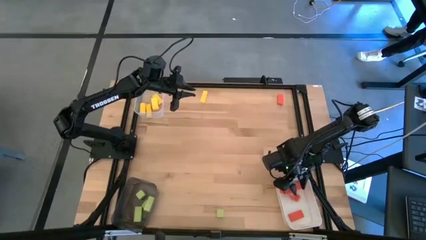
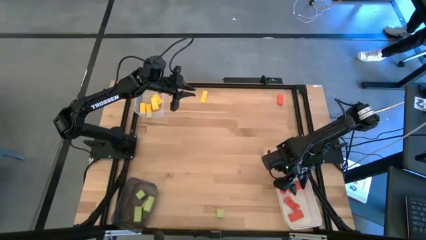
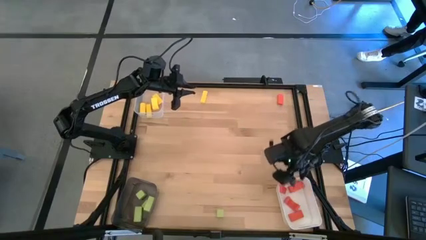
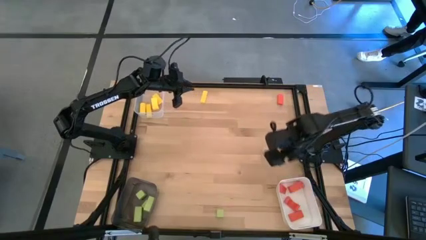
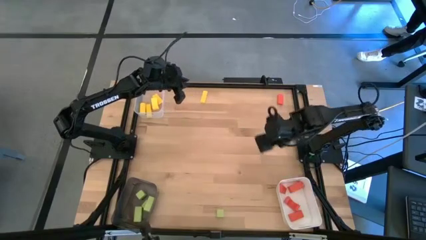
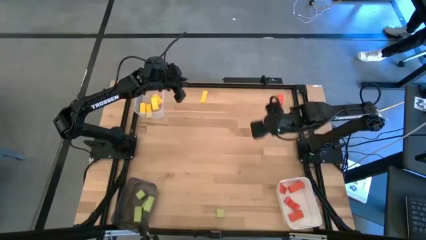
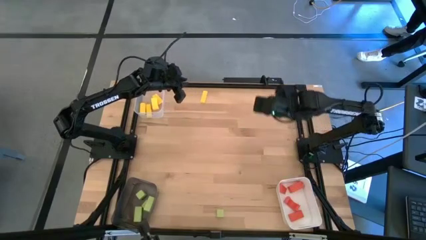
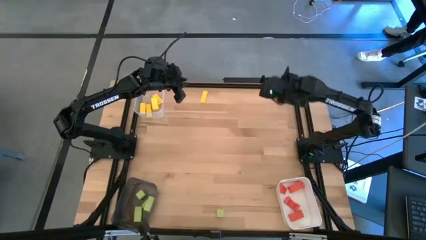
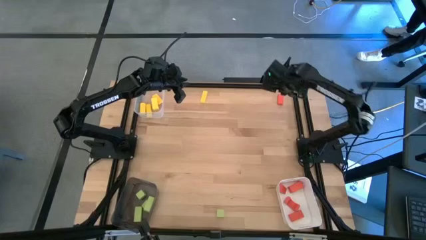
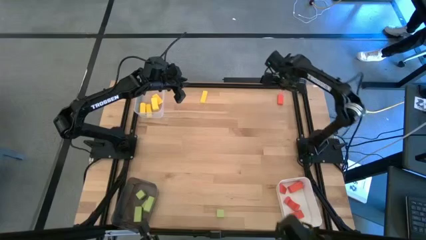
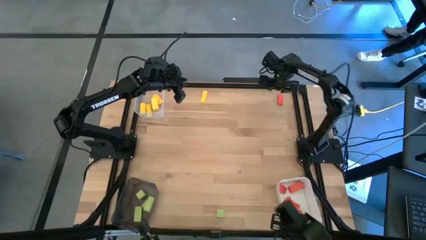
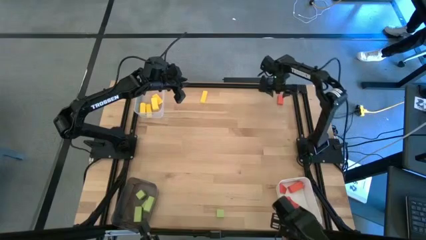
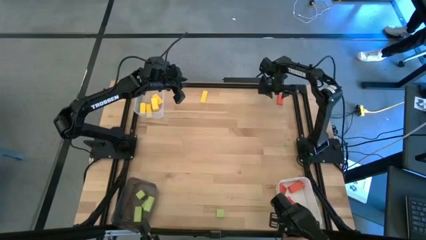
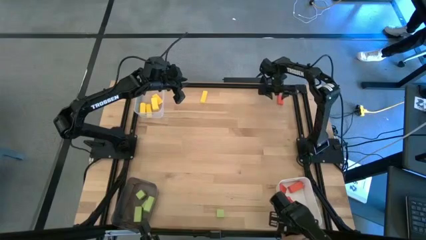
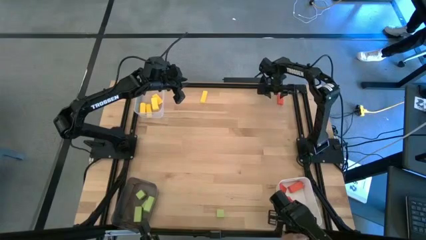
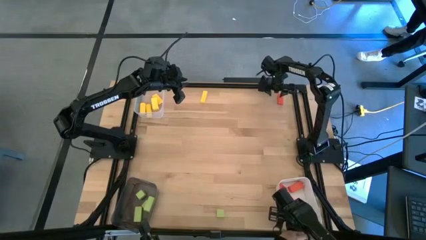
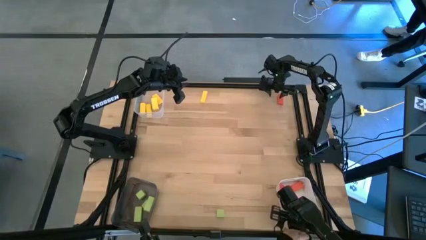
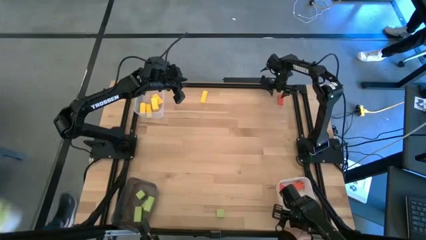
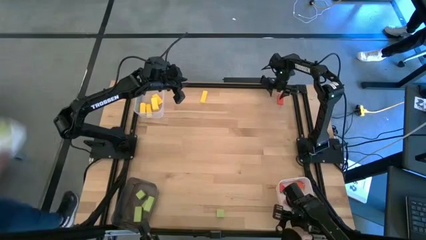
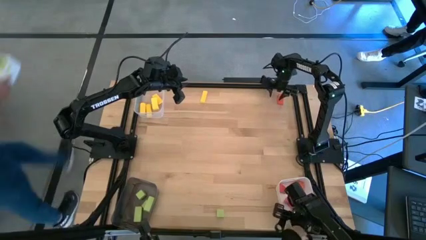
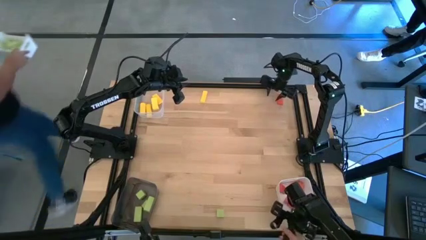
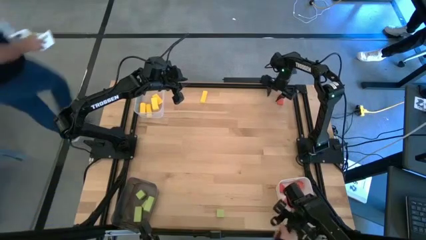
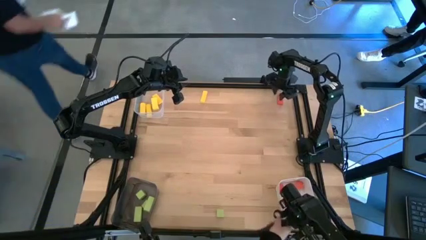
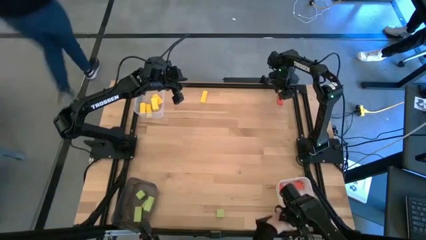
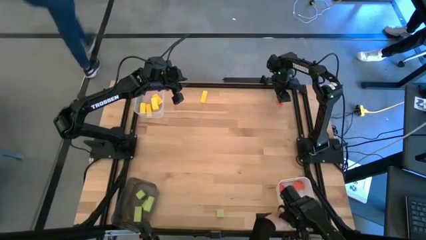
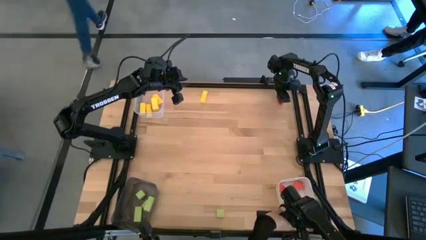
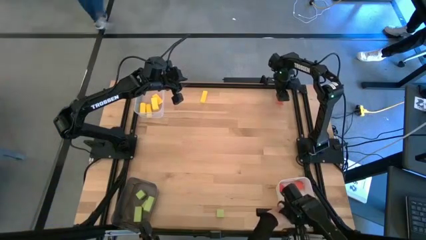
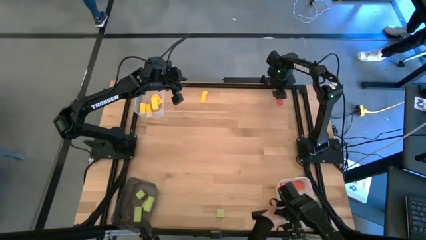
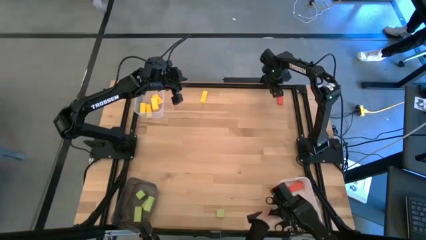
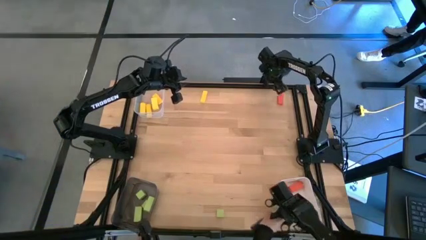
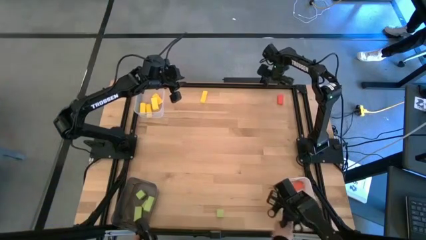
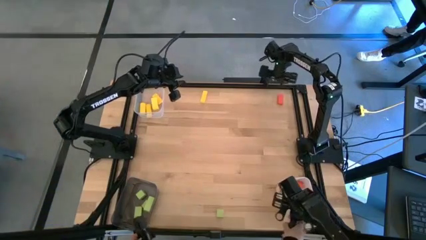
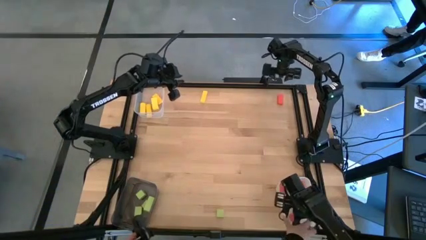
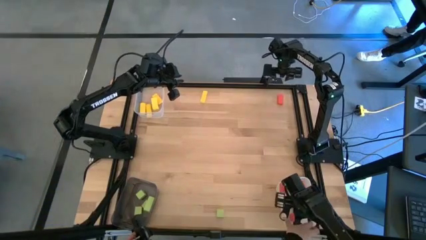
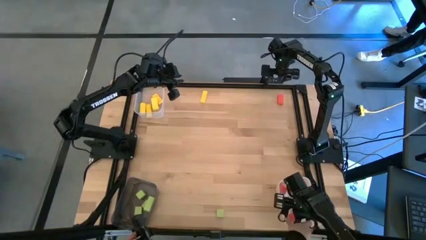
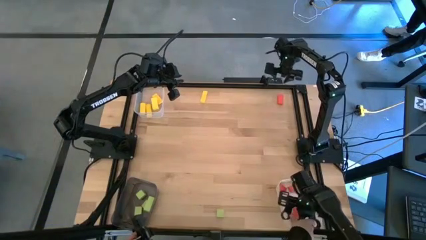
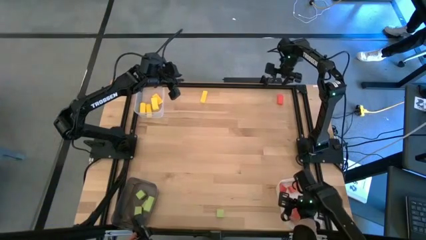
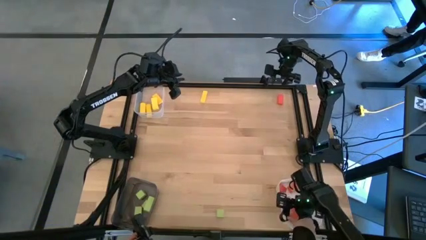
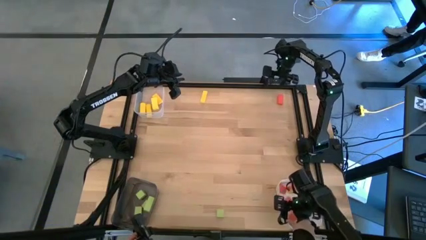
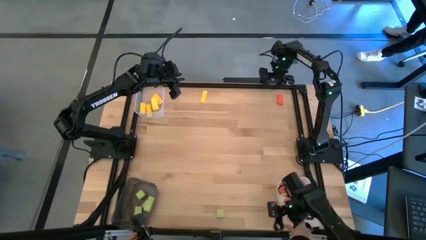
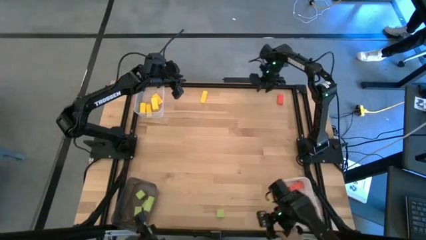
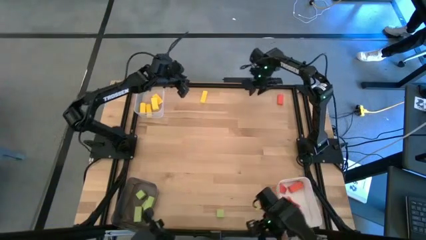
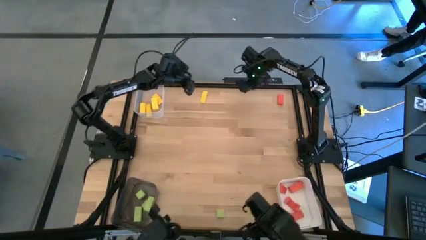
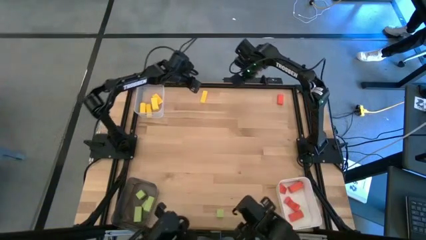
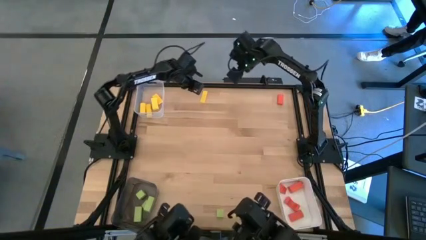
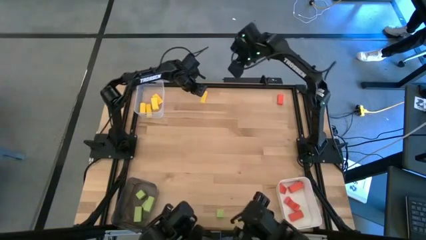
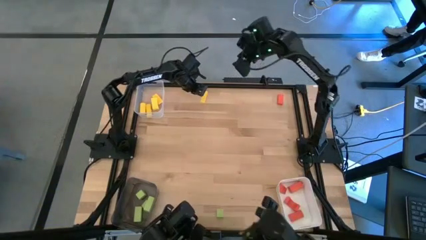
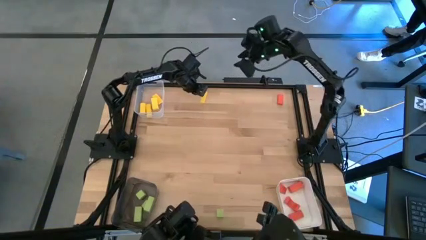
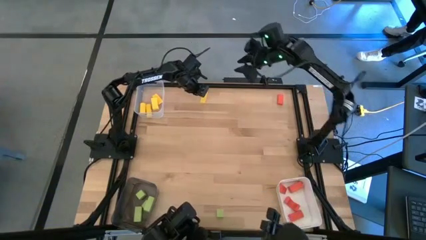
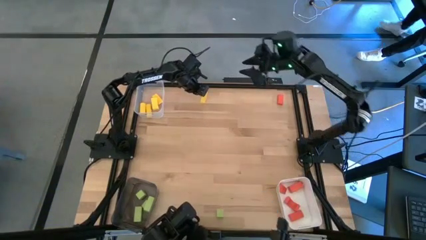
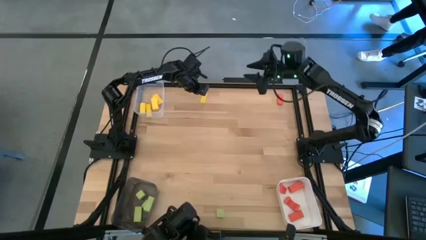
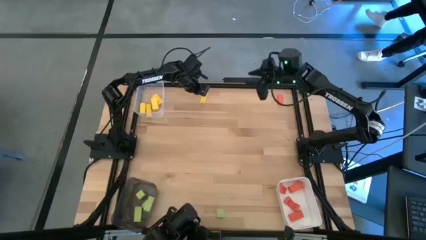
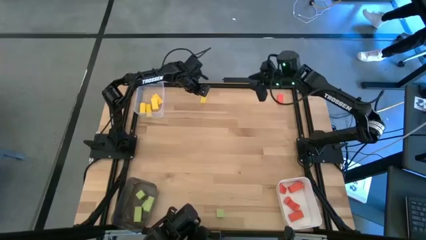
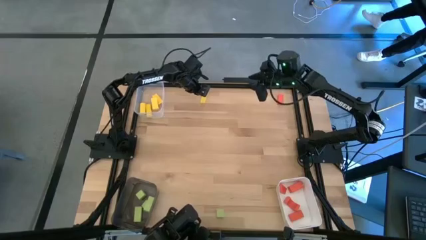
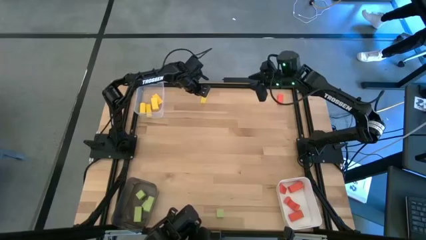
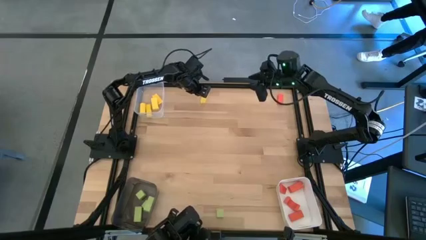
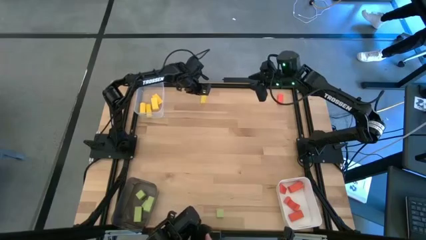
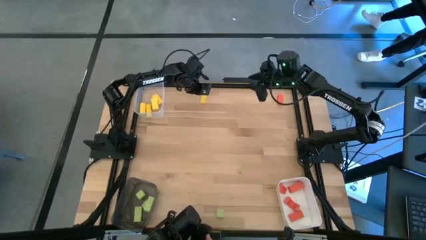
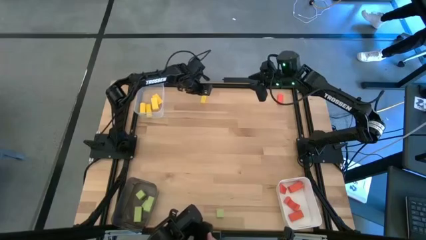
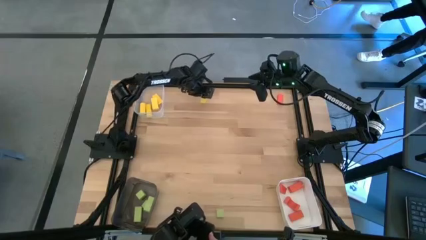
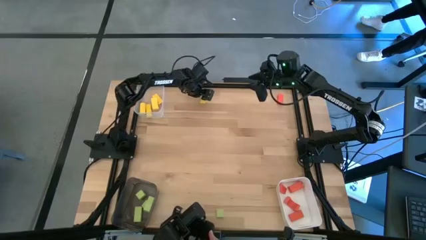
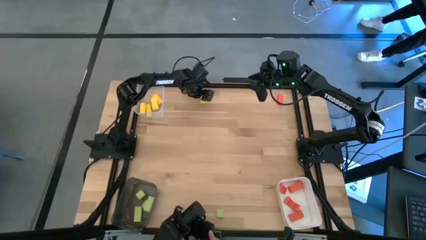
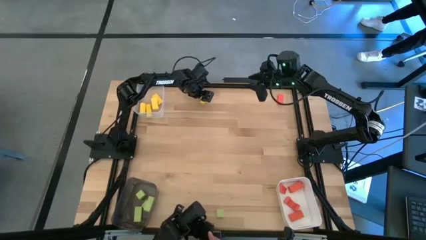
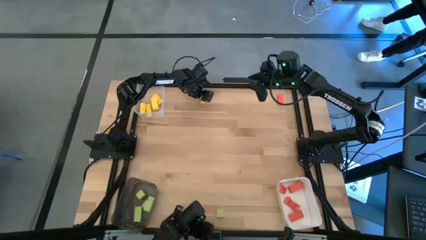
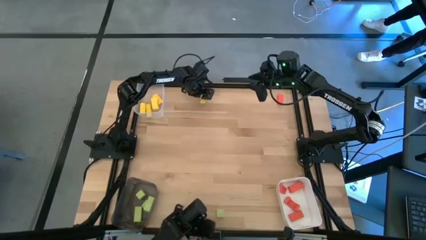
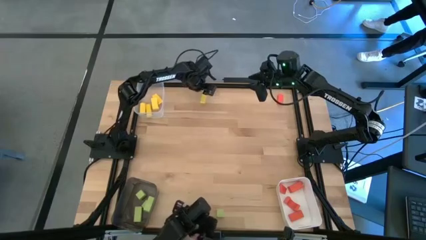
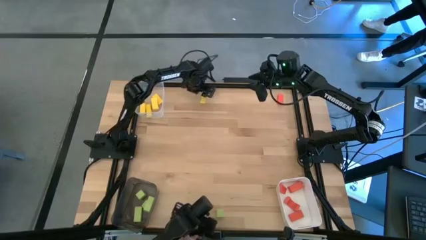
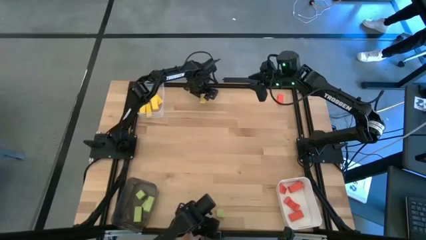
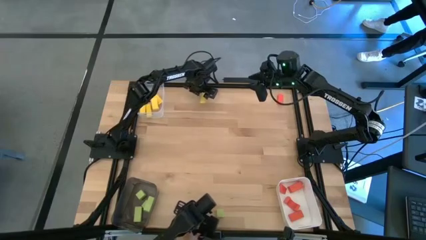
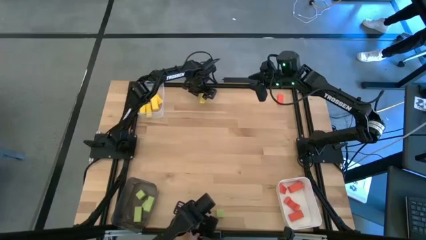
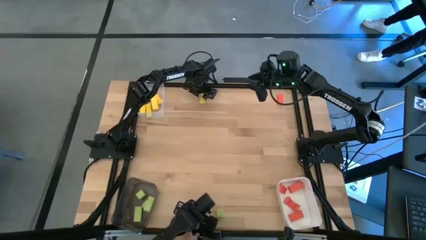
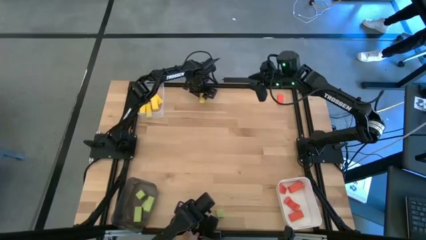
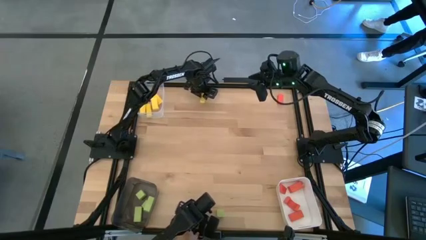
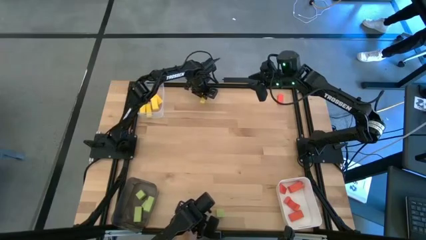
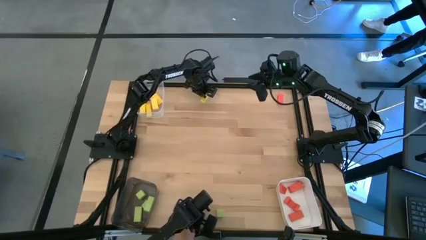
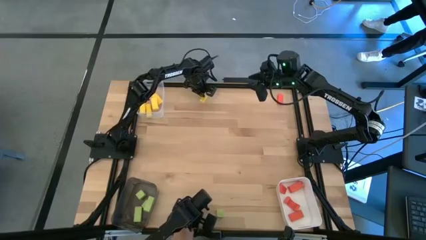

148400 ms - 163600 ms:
Task: Sort & place blocks by color
Put the yellow block into the transparent bin
